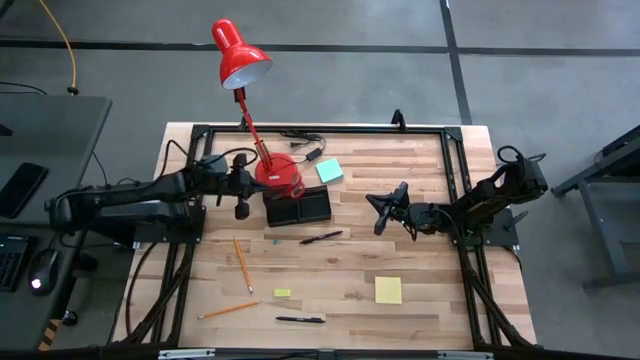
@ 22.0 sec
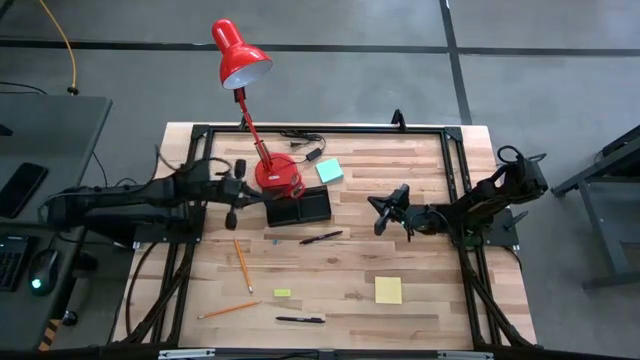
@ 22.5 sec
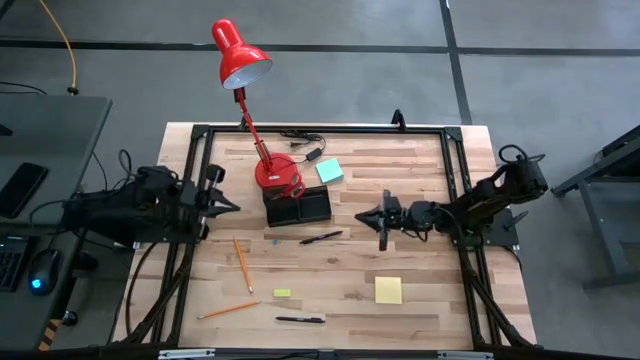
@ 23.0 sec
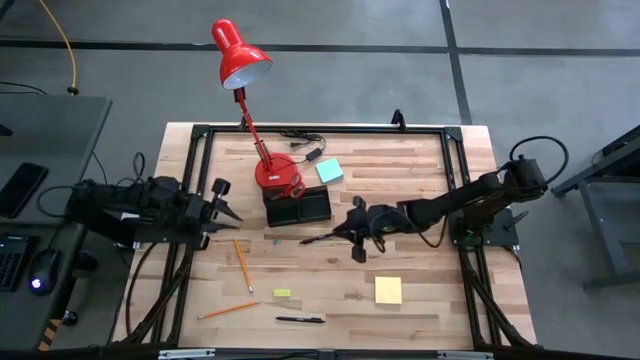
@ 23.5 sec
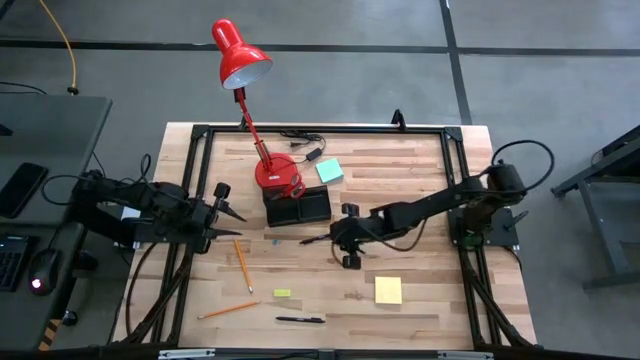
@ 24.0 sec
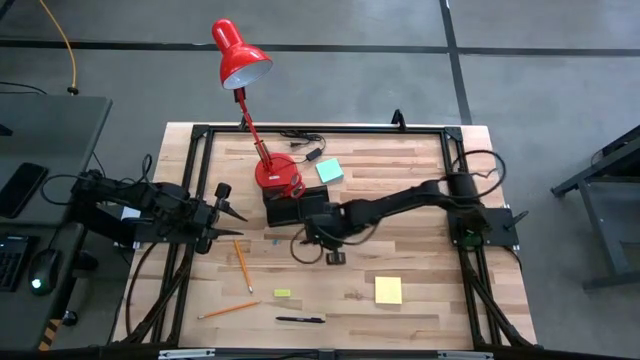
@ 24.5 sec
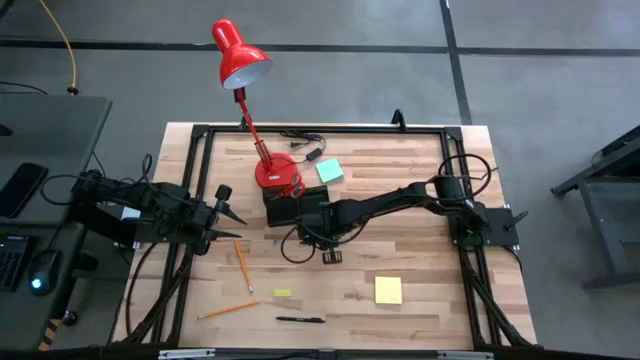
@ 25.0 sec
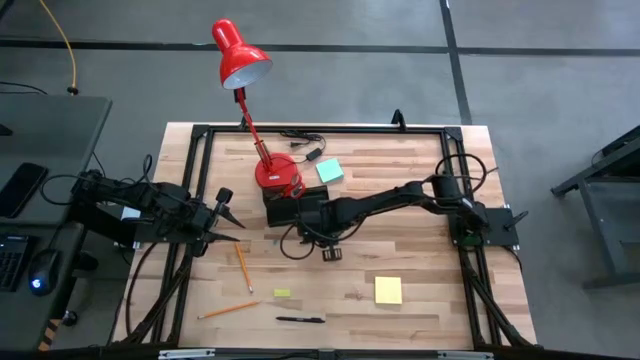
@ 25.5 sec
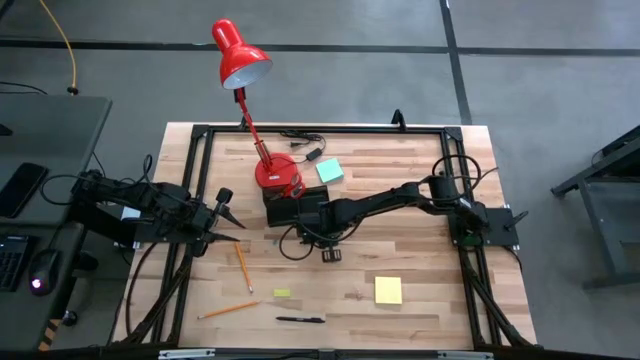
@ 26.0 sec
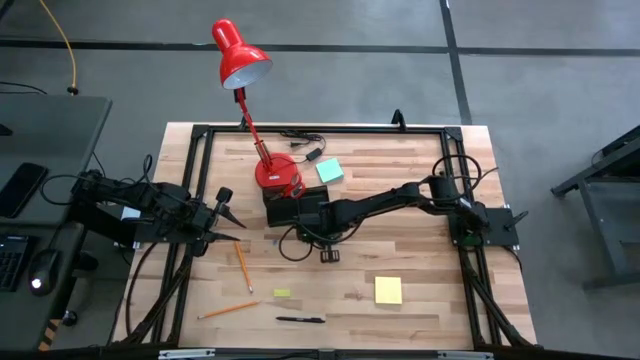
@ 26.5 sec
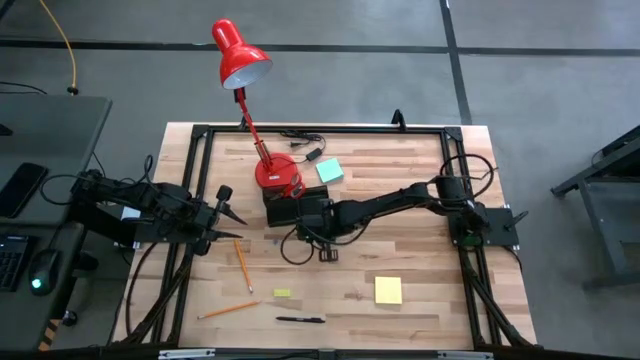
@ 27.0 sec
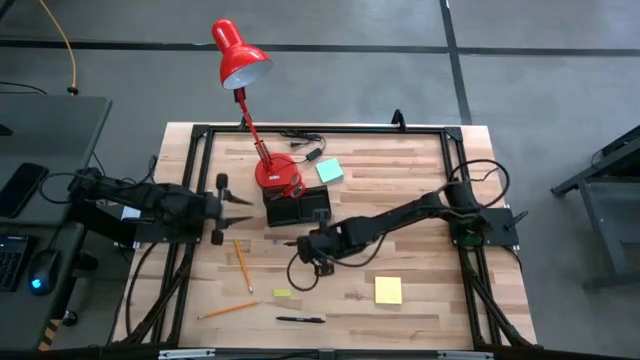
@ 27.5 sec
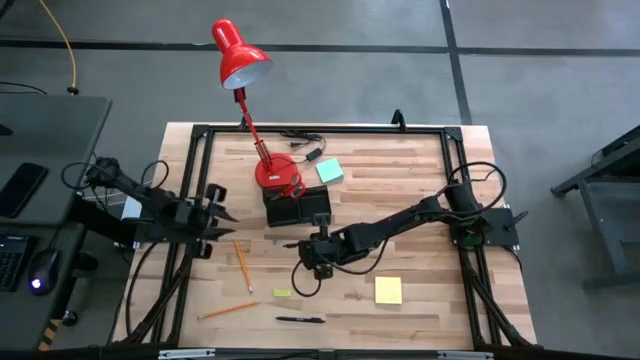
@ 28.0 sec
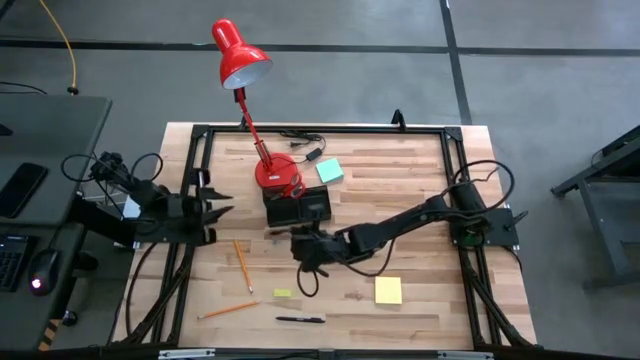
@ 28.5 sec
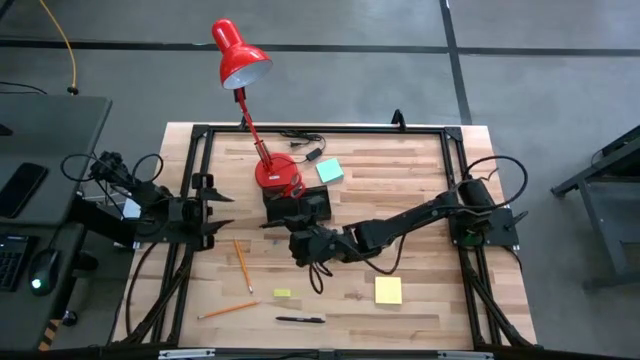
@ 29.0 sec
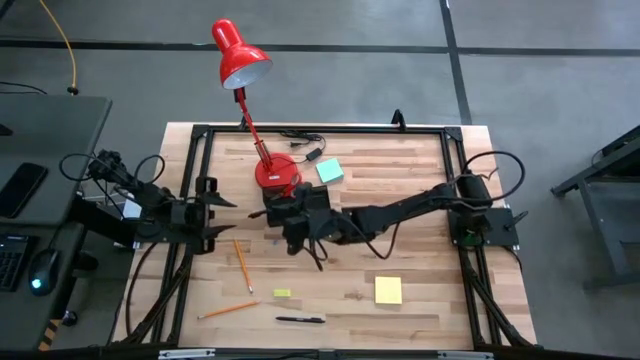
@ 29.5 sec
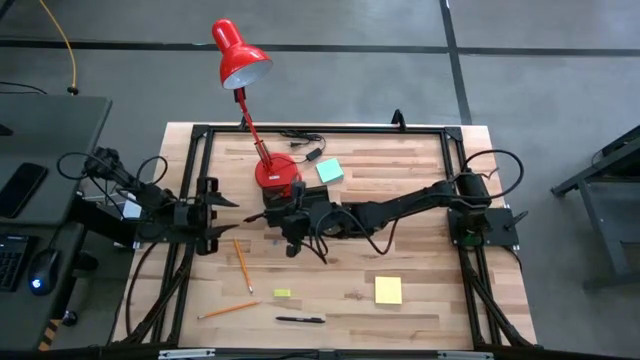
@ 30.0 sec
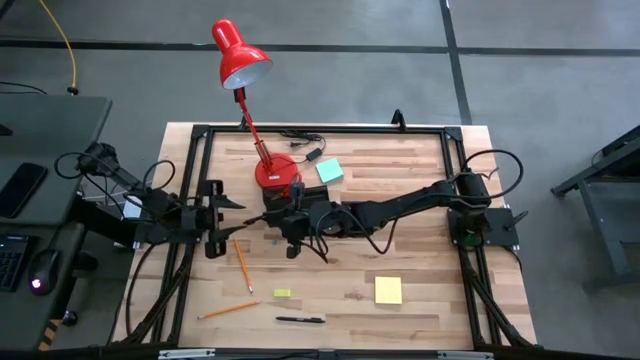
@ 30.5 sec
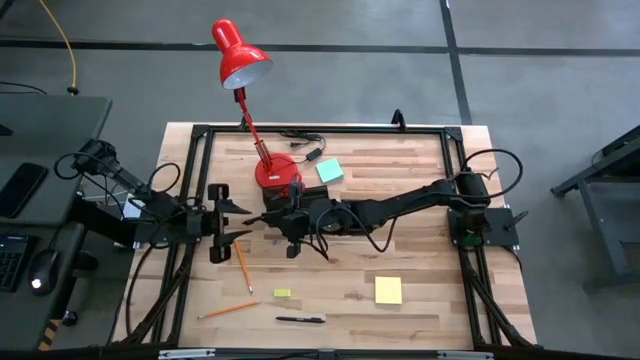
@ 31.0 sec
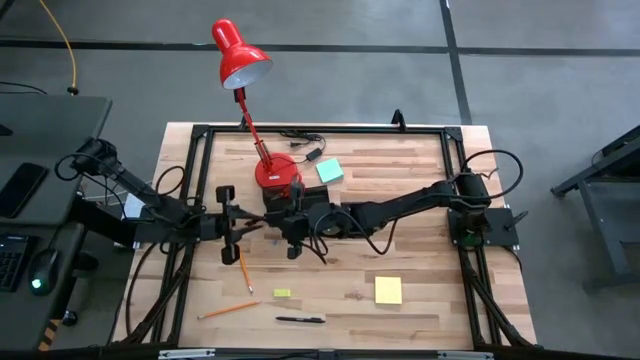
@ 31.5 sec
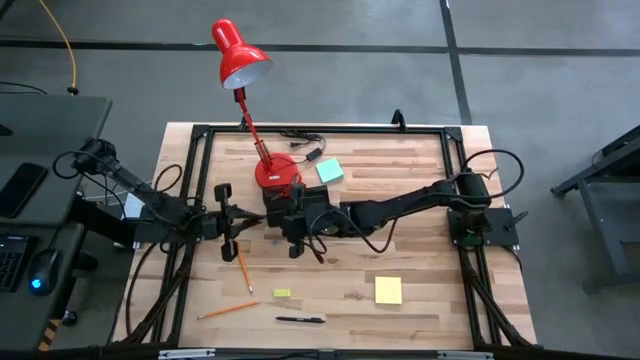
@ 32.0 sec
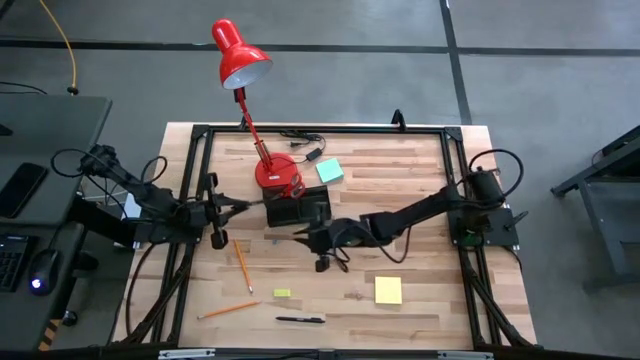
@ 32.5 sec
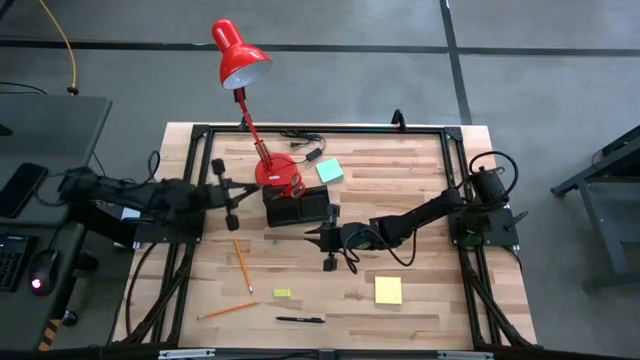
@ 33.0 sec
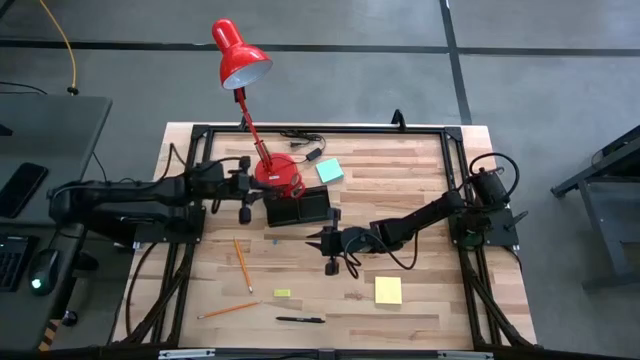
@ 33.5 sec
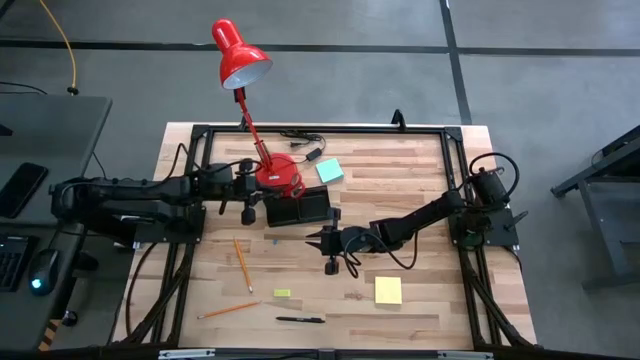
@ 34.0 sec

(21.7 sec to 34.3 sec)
Task: Pick and place office supplies into organizer
Put the top black pen into the desk organizer

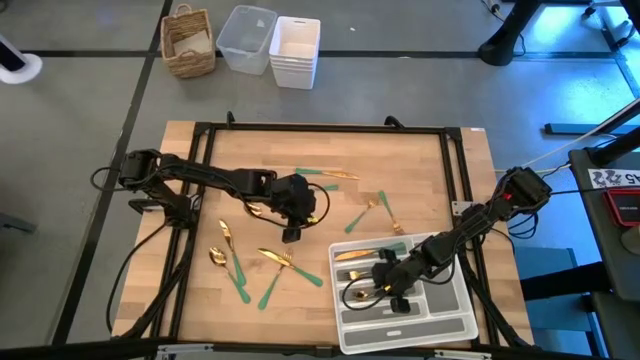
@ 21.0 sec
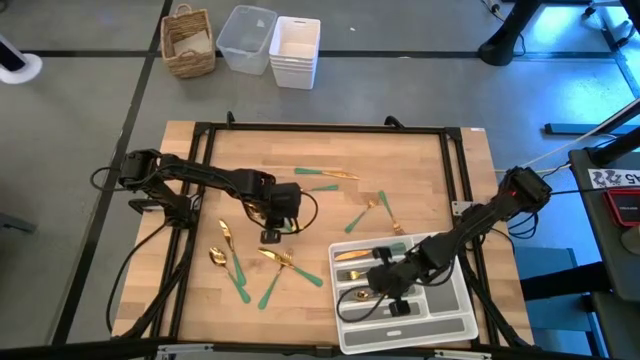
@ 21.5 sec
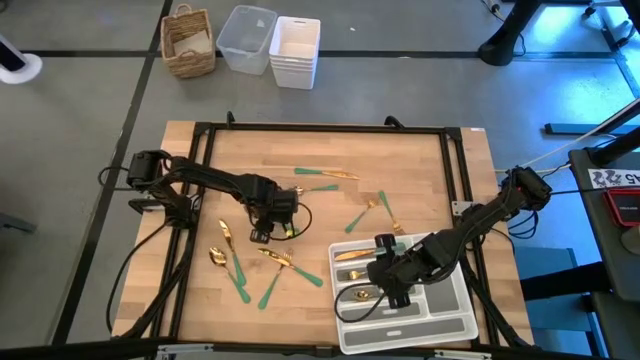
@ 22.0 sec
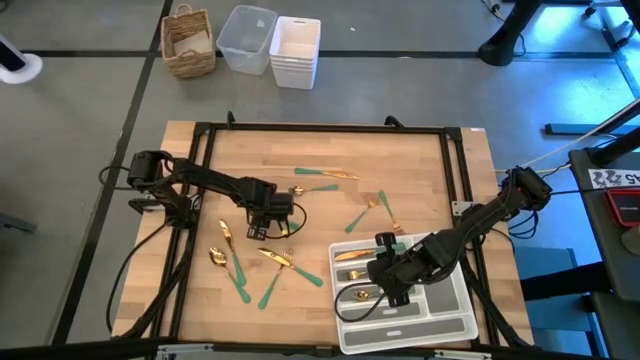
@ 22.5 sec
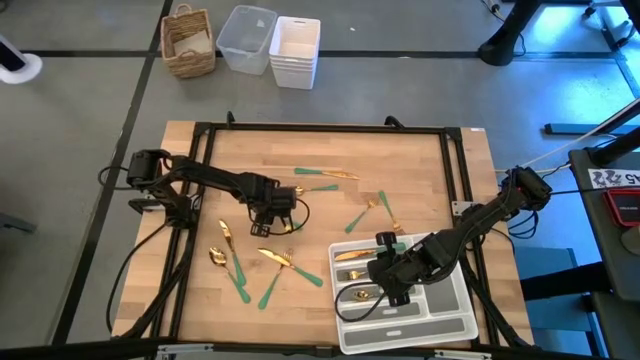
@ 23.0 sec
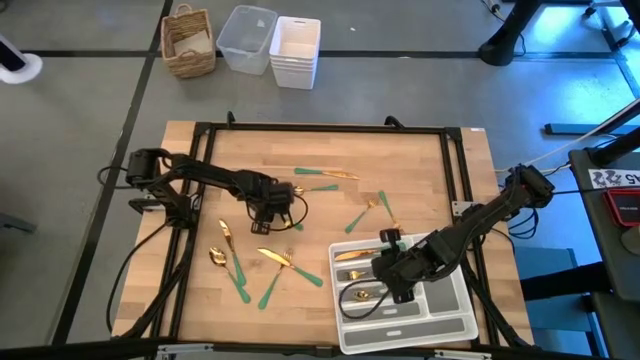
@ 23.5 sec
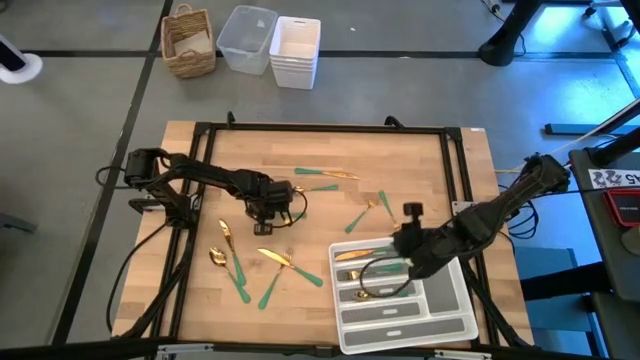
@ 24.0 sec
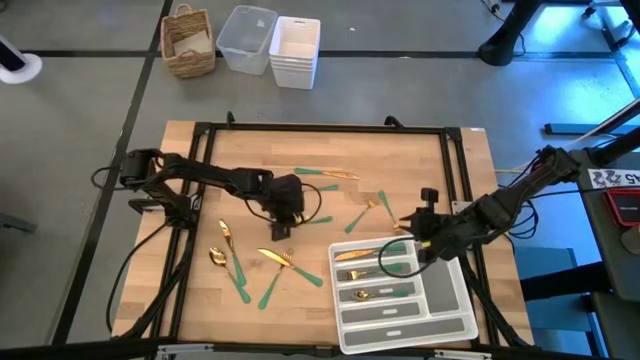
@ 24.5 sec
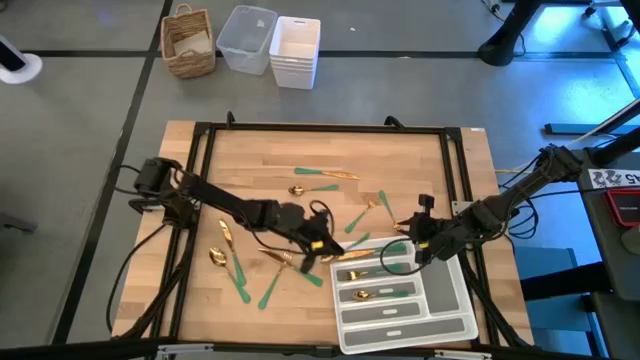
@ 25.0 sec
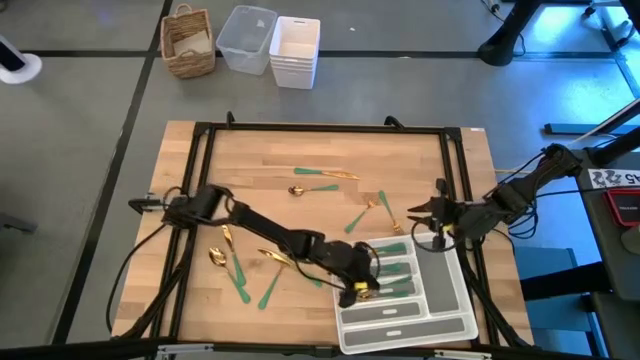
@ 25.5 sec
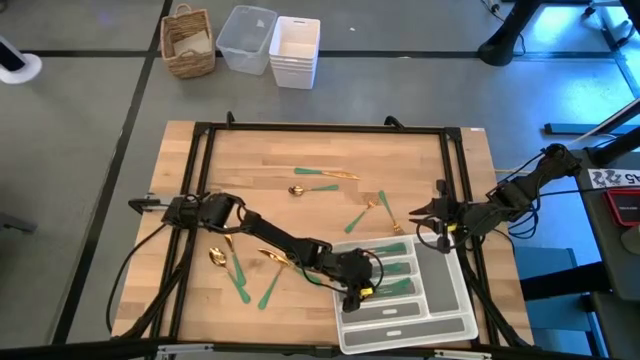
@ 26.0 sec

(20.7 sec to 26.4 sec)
Task: Sort silverware
Put the middle spoon into the silverware tray

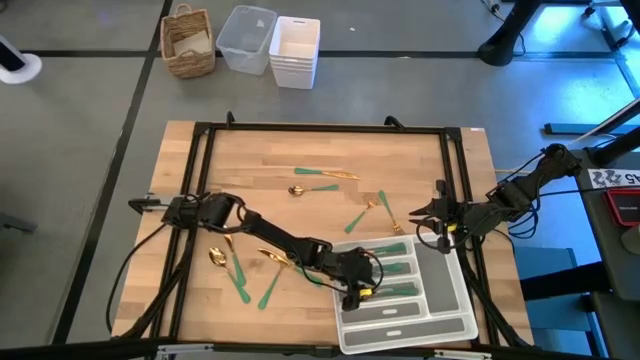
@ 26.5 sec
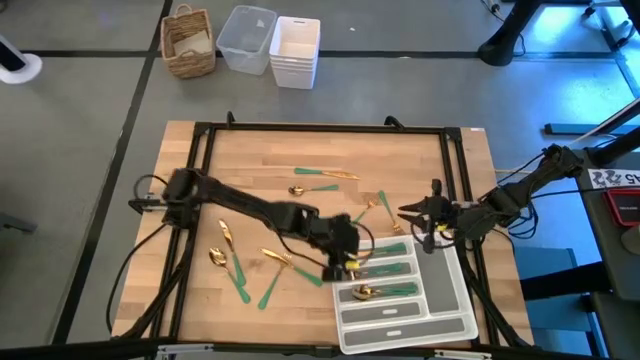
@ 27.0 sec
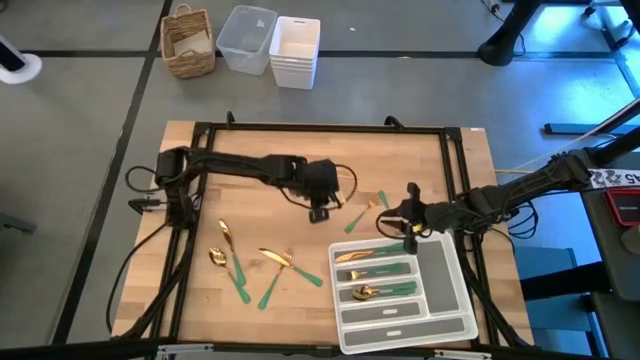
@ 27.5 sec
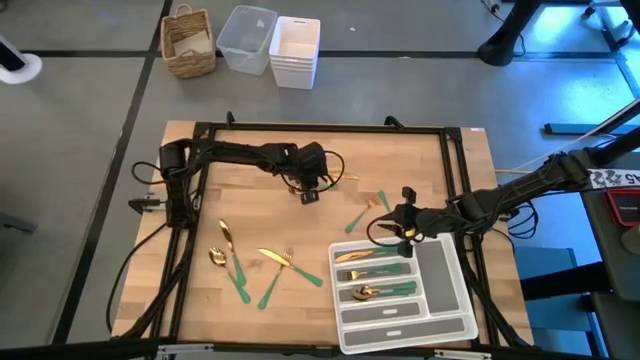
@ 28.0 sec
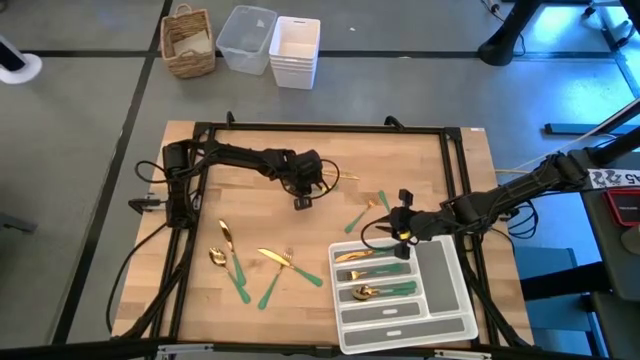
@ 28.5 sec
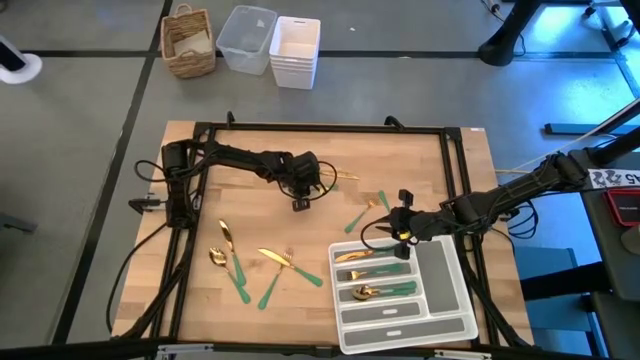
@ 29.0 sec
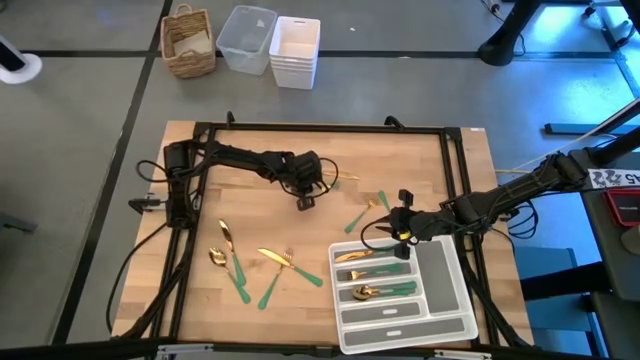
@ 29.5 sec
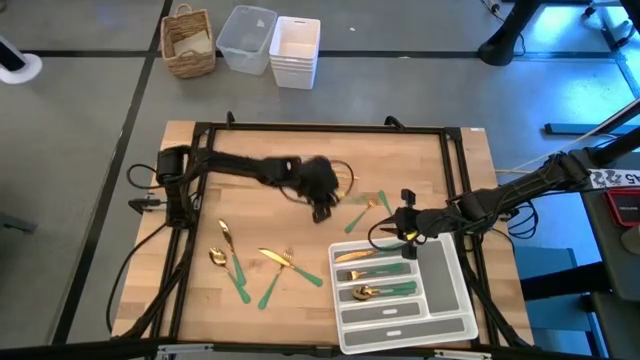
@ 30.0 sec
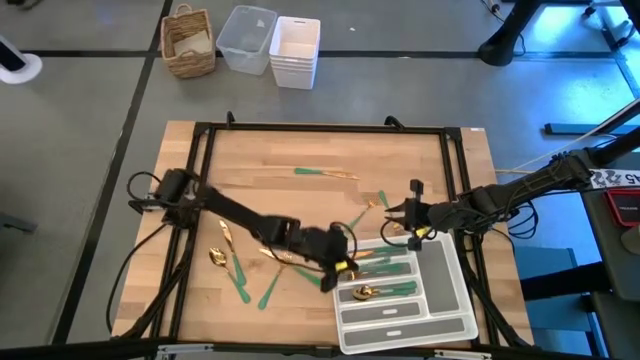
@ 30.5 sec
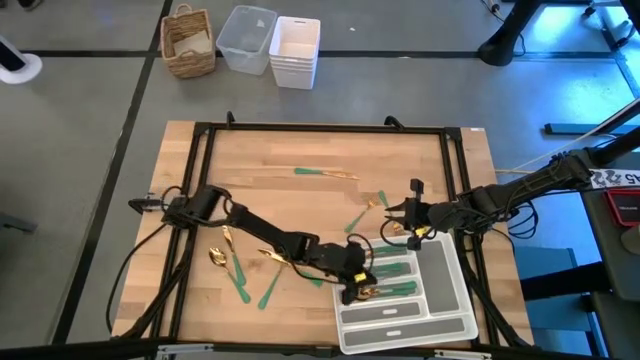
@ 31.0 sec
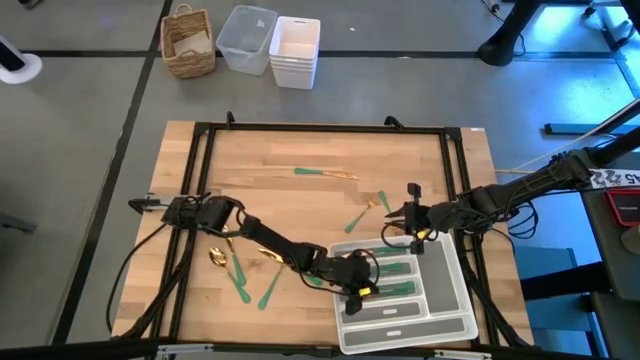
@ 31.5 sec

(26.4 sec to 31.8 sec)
Put the top green spoon into the silverware tray
